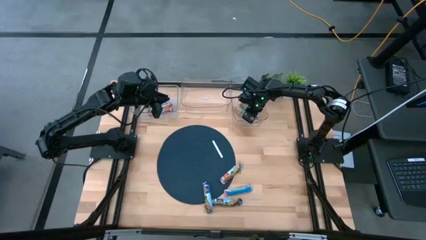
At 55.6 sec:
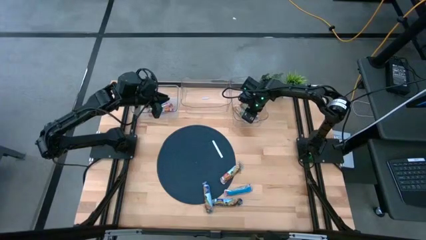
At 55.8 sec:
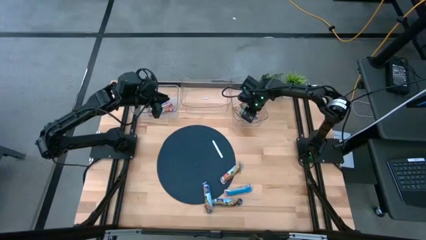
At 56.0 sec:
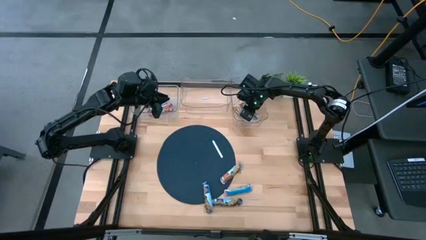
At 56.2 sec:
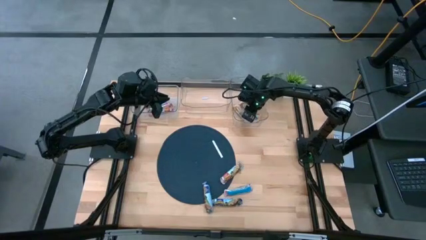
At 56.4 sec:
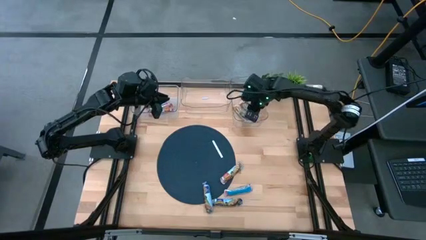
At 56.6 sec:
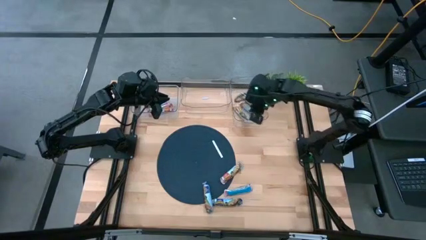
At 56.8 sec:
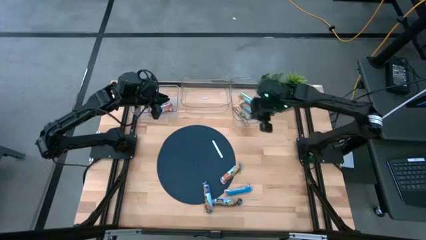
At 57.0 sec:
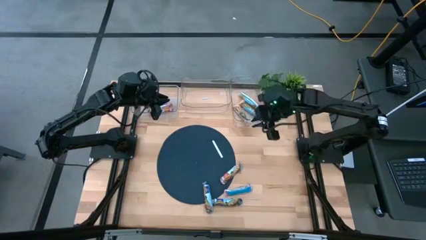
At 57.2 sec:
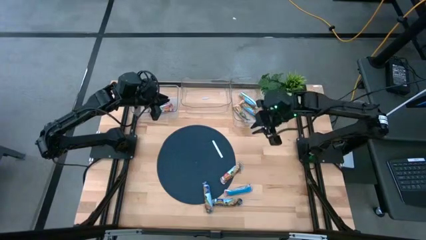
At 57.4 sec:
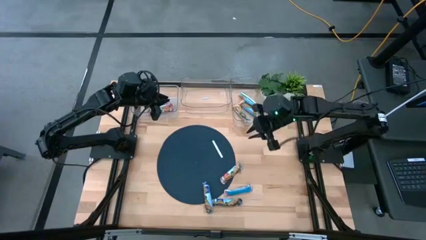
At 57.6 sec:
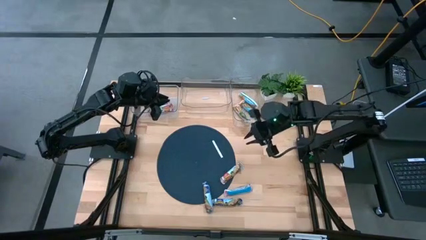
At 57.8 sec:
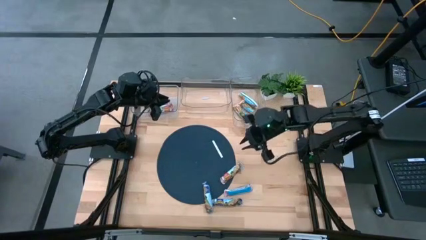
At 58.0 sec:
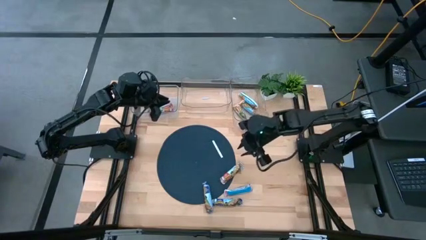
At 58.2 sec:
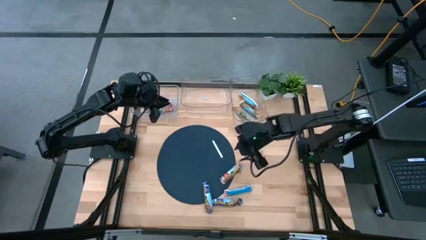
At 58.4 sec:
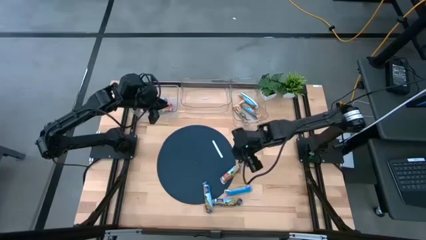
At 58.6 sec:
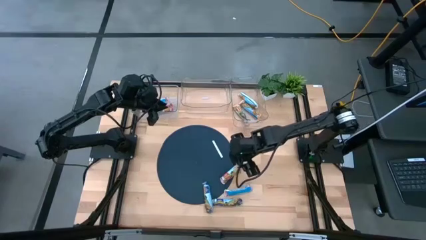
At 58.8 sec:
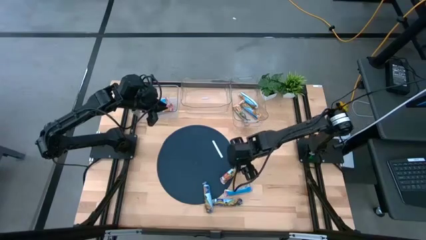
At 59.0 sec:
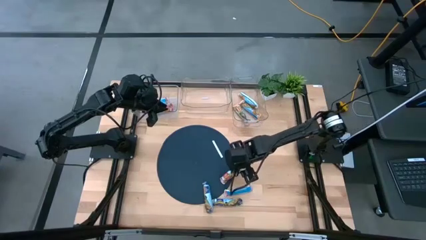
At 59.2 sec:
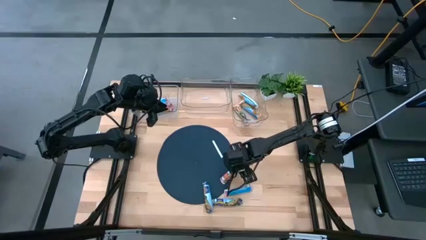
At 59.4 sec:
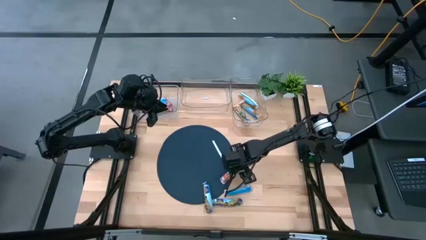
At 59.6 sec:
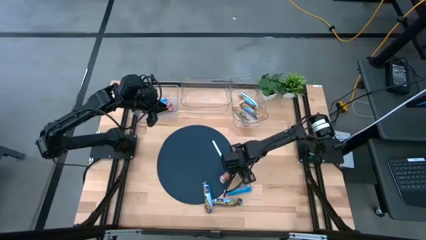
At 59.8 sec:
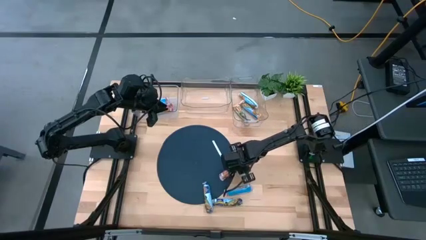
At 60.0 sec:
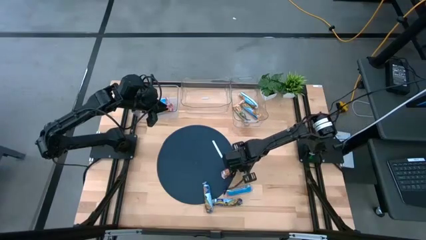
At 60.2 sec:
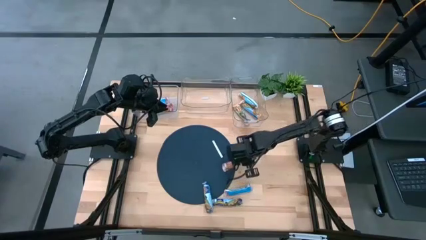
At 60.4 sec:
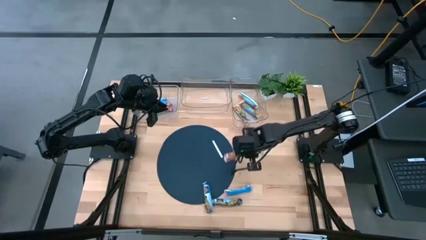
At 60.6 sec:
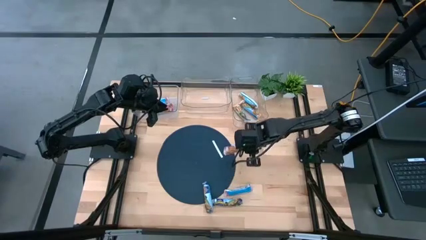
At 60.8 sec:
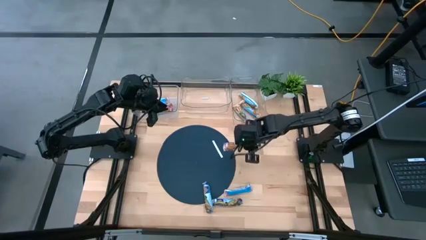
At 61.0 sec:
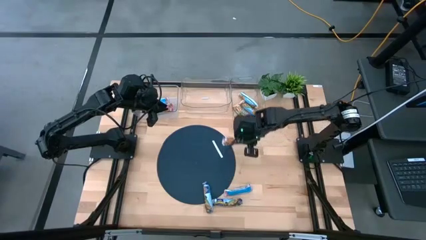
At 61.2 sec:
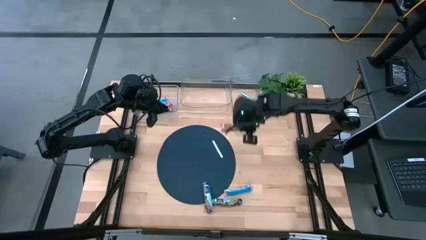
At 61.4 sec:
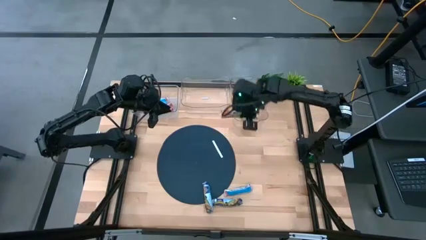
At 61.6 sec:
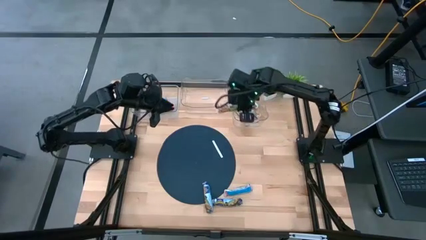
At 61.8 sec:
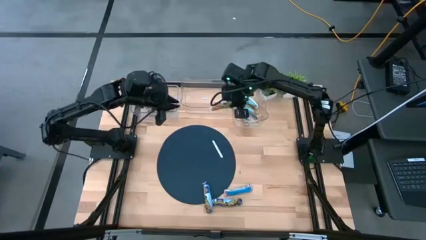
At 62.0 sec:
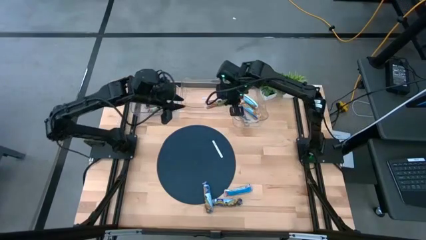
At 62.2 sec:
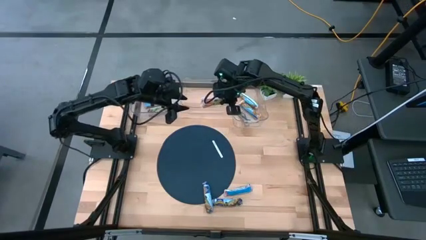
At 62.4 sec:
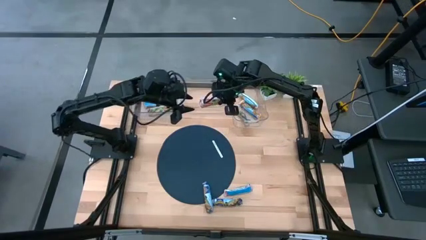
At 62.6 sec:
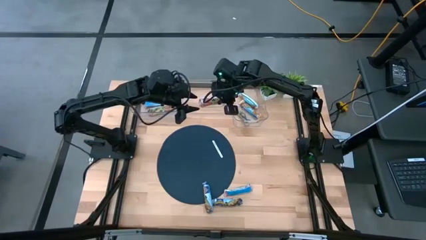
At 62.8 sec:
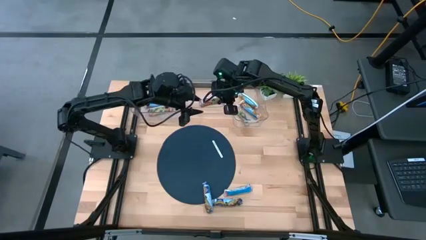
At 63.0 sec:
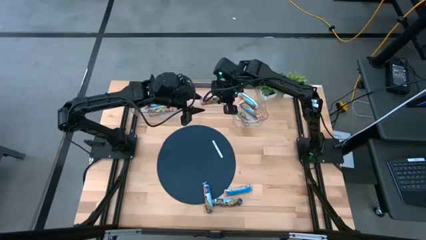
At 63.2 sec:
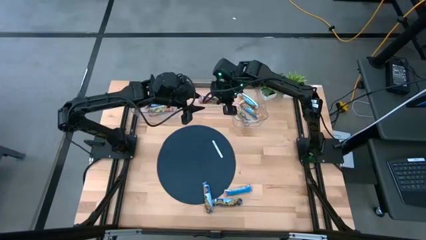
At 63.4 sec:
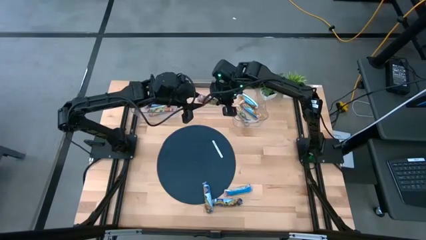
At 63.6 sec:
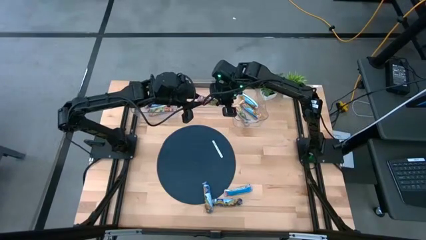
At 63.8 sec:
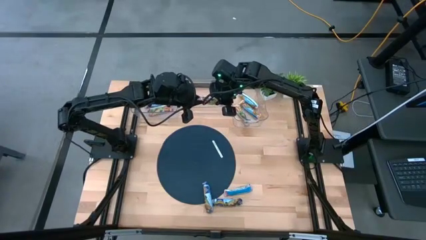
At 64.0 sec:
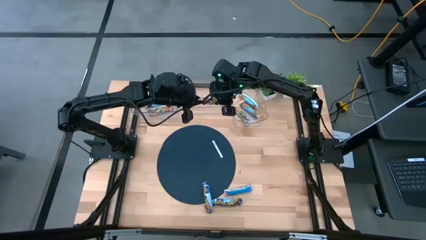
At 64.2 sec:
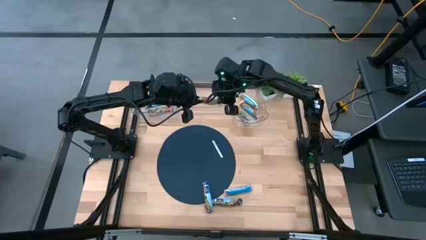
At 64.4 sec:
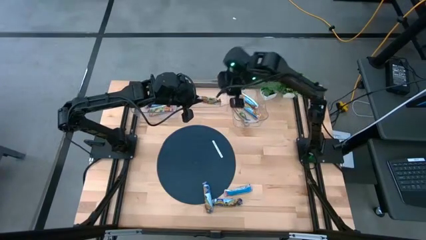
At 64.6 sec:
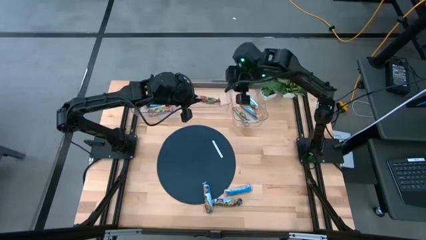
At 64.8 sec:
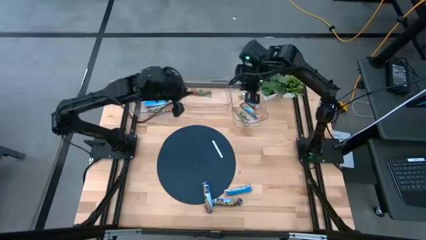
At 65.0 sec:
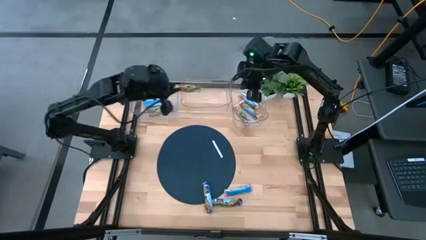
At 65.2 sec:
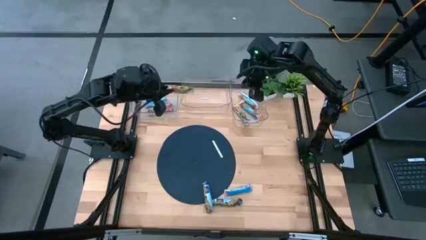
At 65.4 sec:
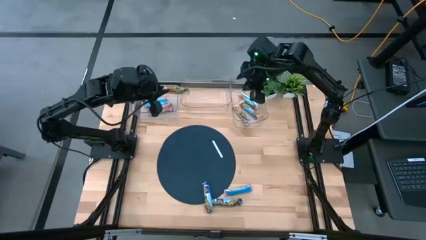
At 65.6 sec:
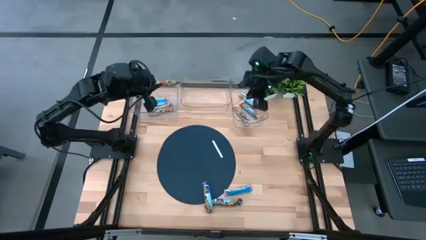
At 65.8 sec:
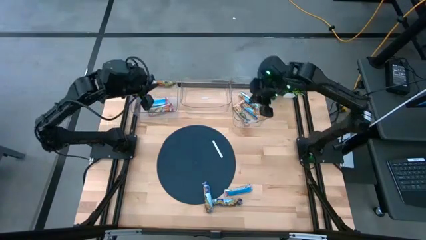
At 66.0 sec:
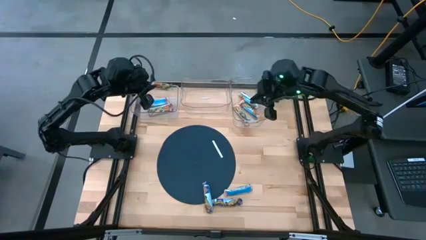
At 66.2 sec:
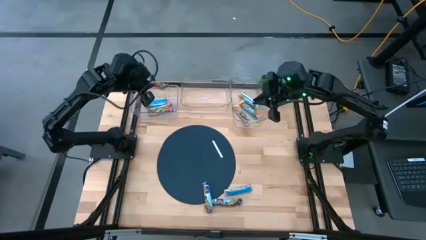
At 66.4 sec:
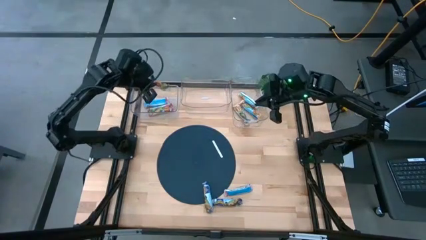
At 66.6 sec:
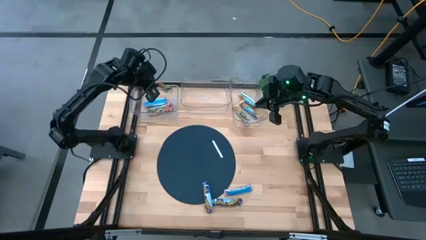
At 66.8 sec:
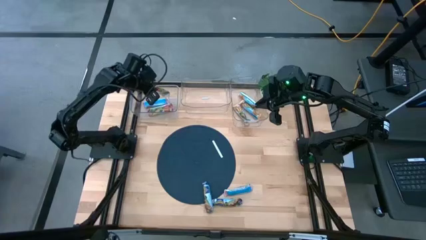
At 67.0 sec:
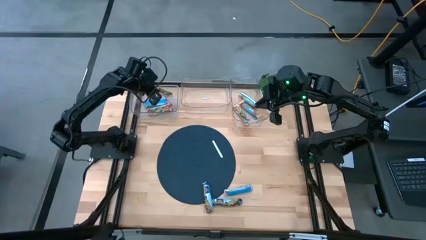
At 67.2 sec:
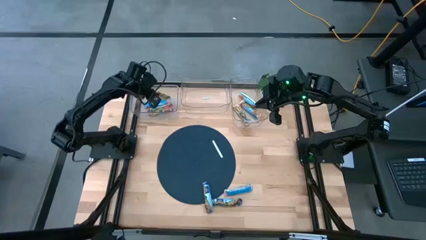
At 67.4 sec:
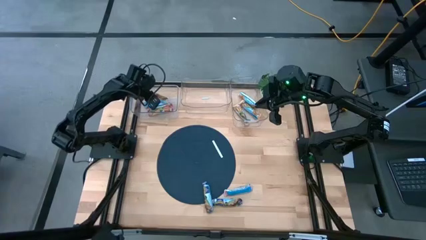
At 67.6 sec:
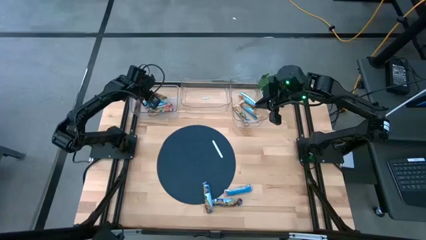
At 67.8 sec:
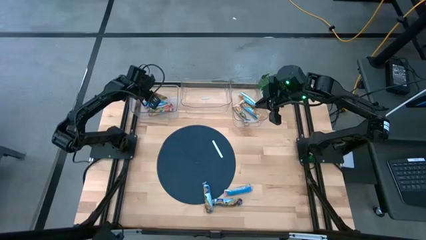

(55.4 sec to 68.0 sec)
Task: Pick and place Granola Bars by type
Put the top red chewy bar into the top left transparent bin
